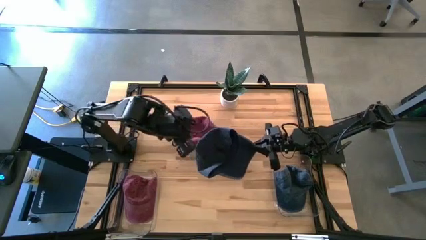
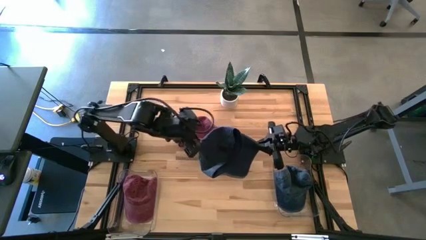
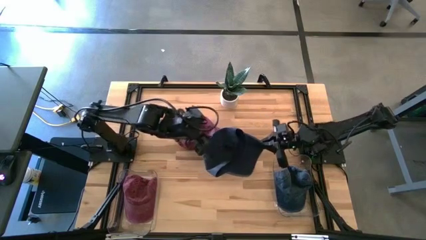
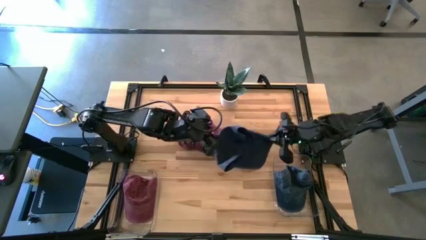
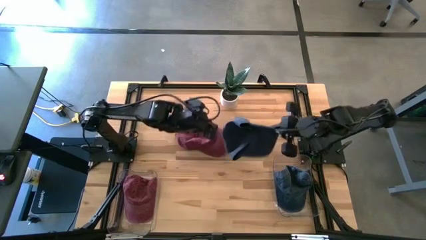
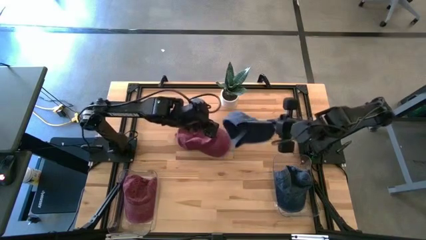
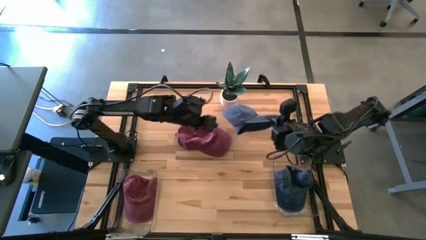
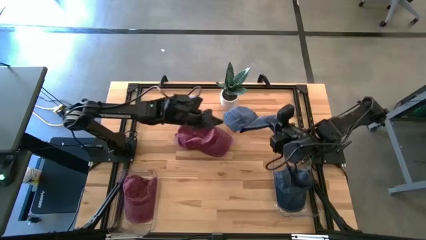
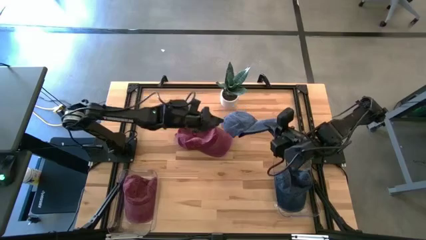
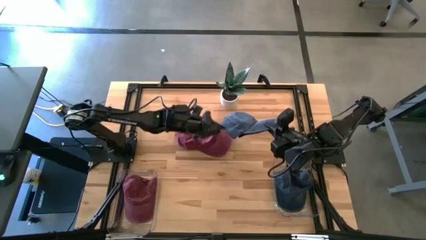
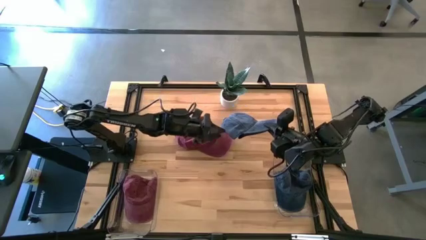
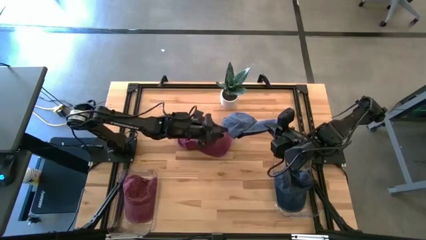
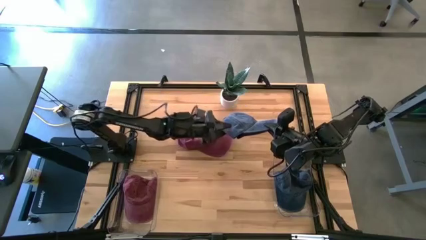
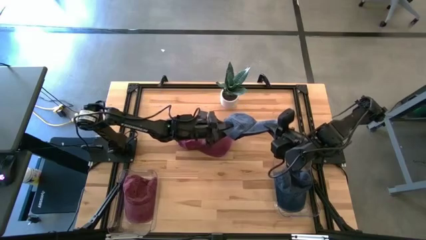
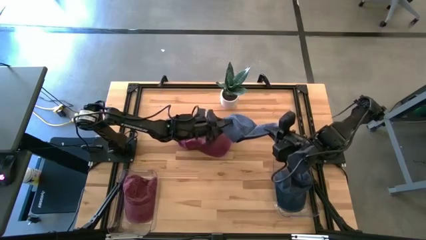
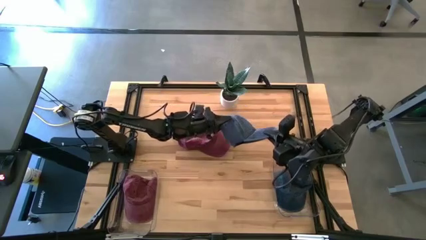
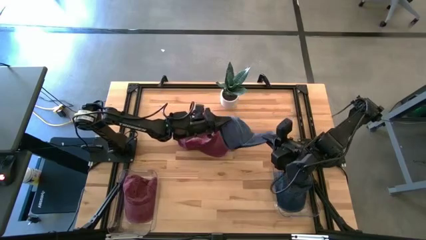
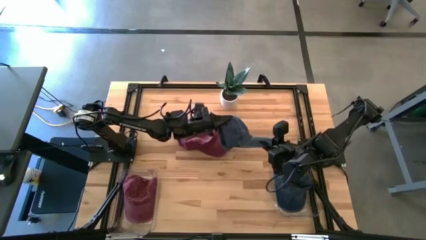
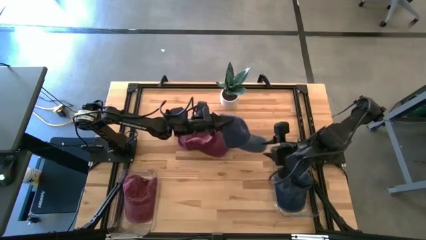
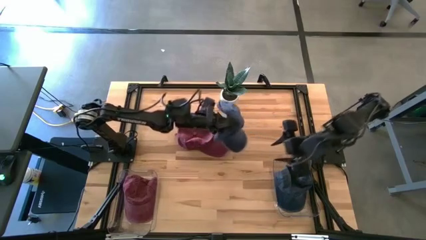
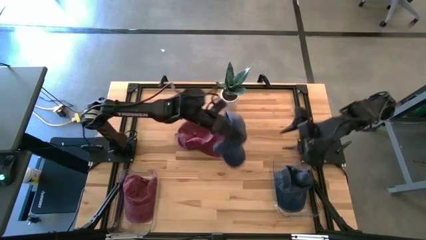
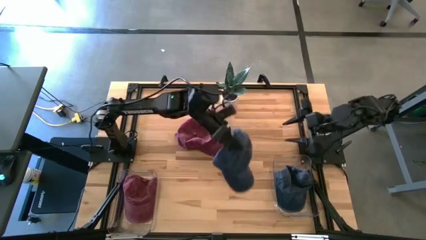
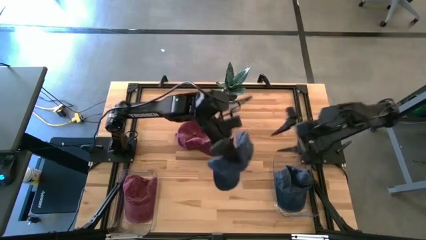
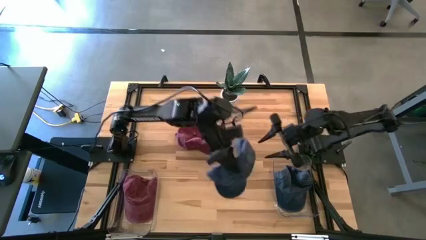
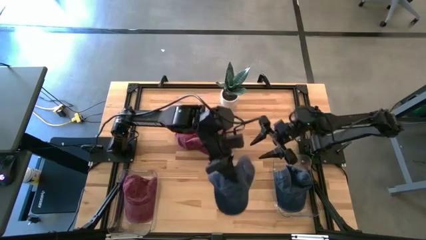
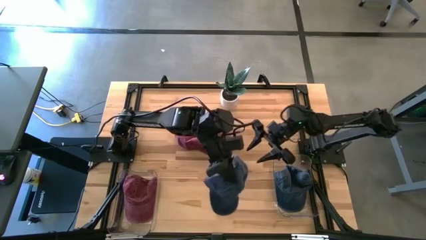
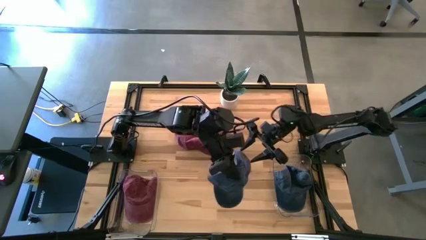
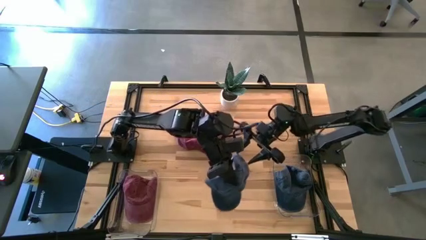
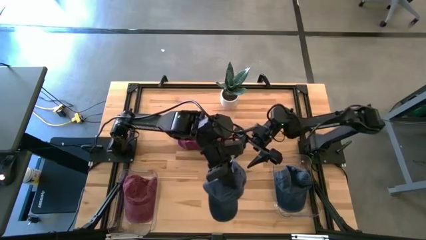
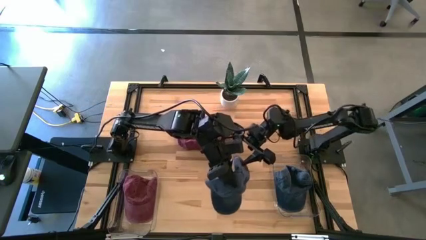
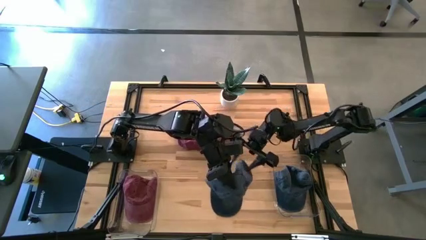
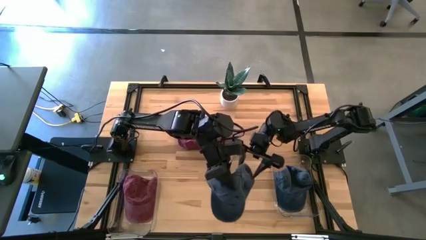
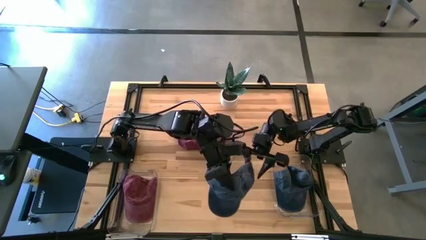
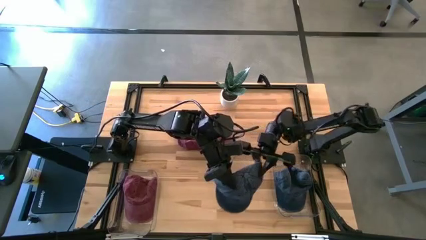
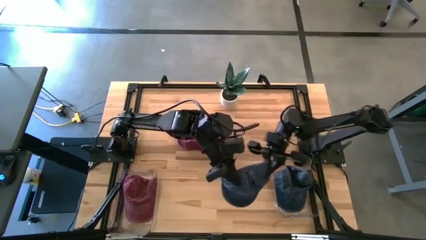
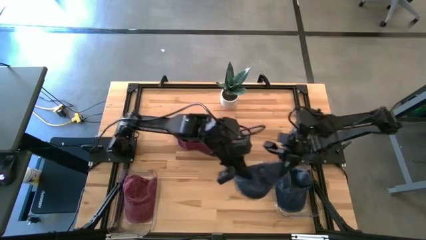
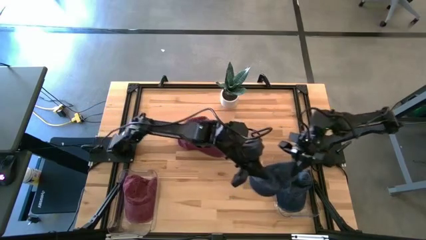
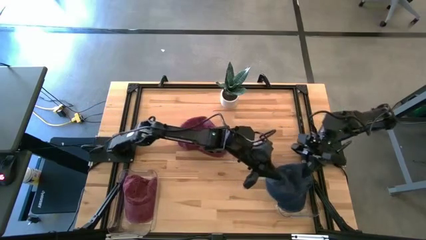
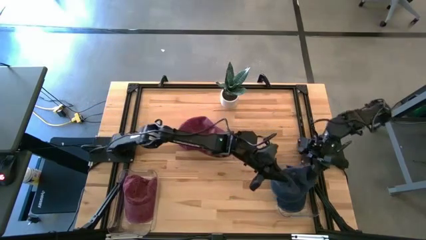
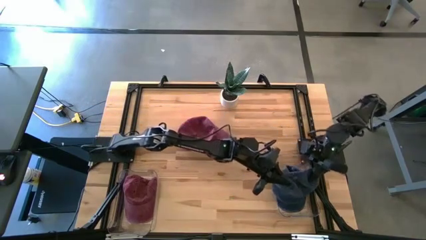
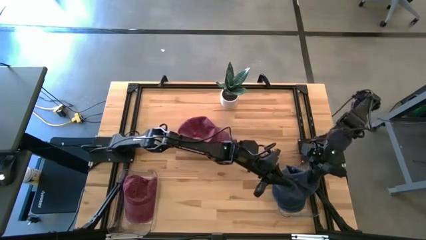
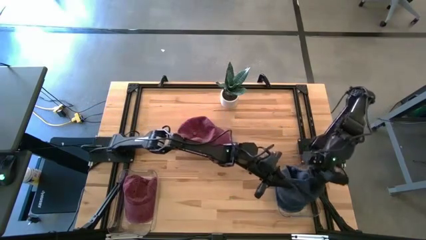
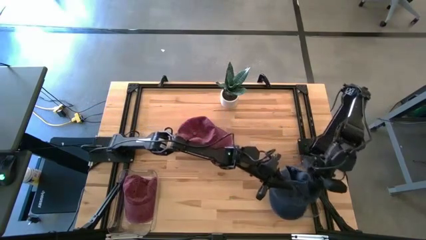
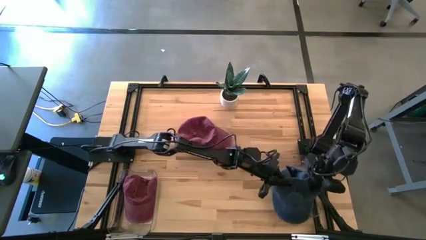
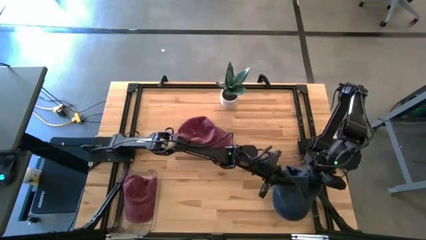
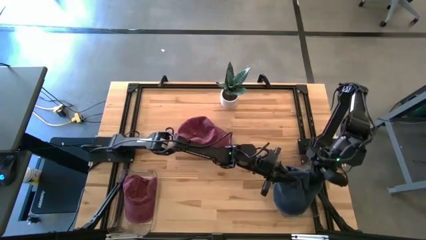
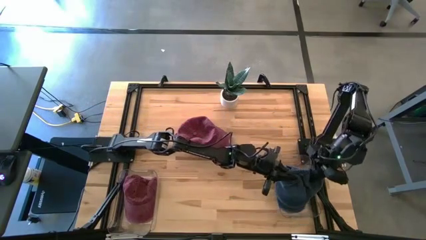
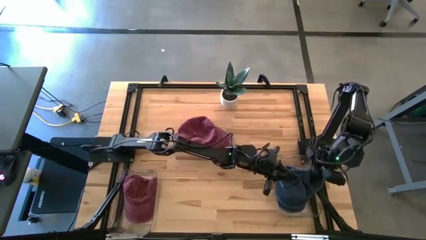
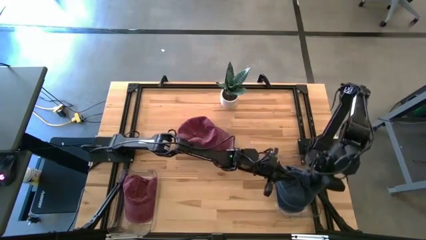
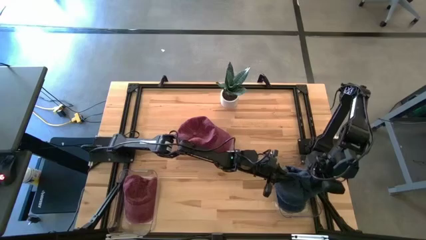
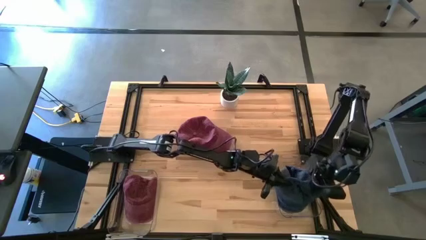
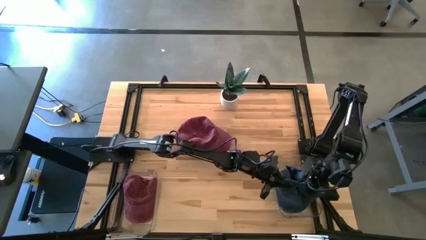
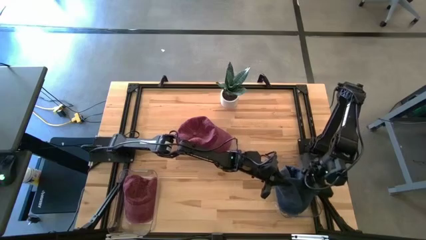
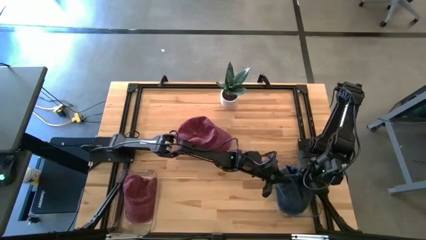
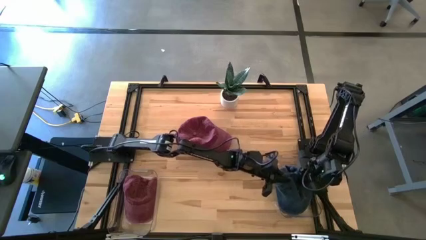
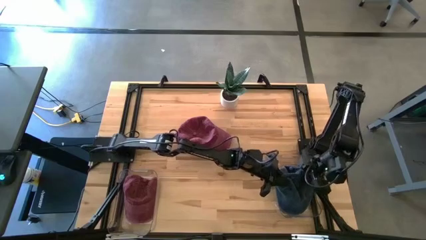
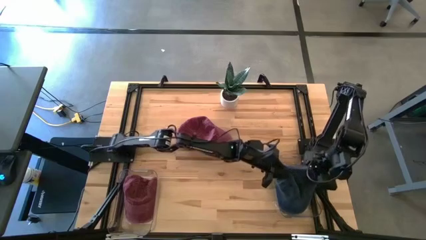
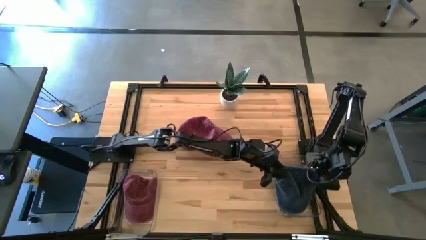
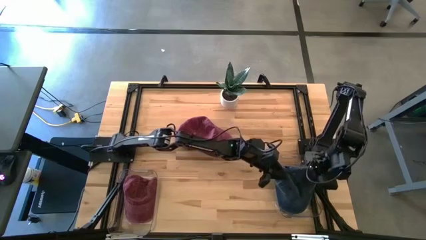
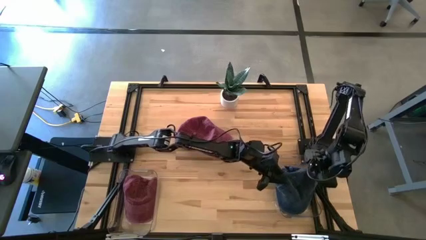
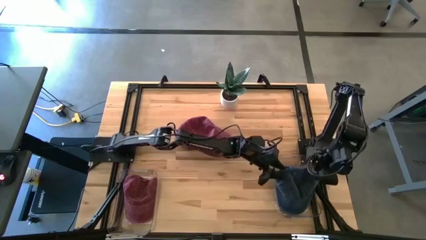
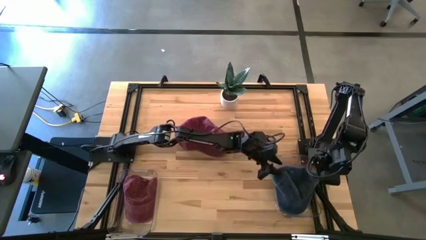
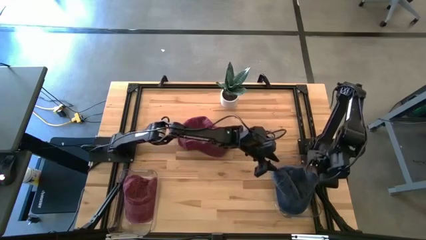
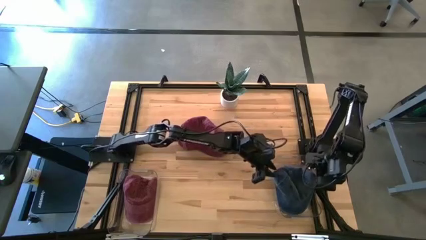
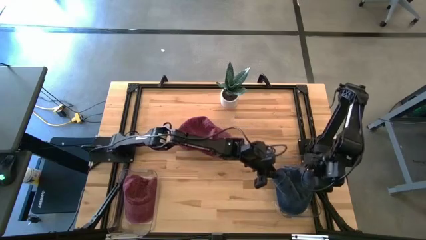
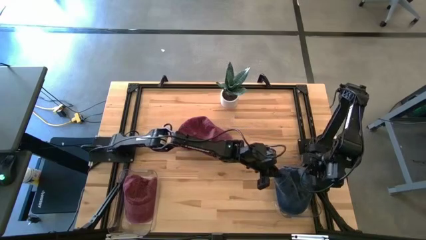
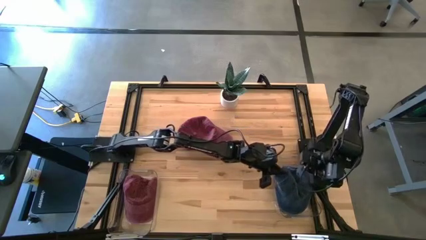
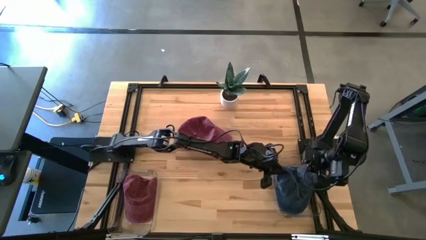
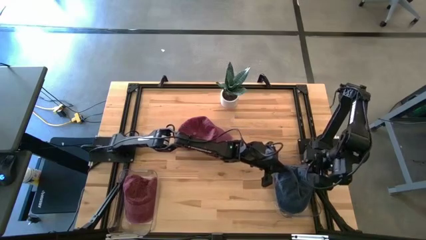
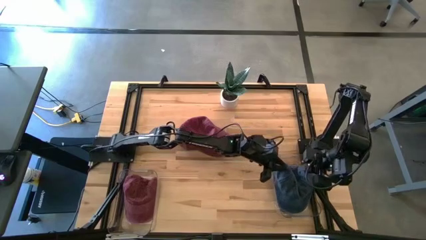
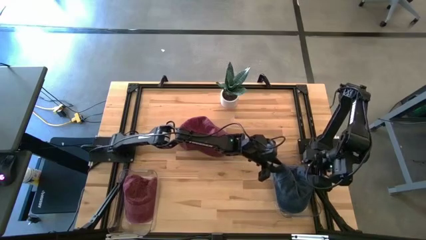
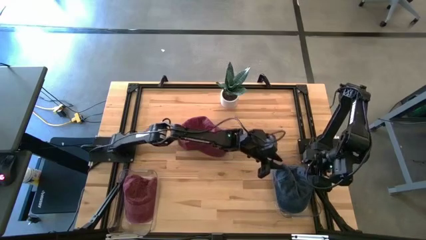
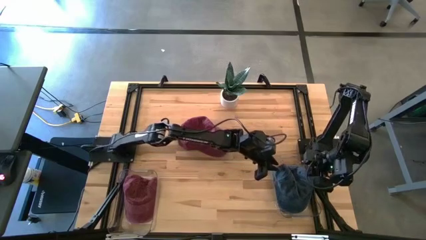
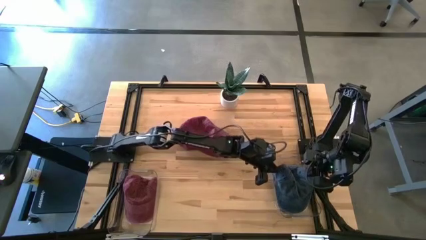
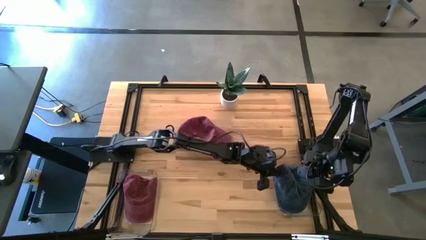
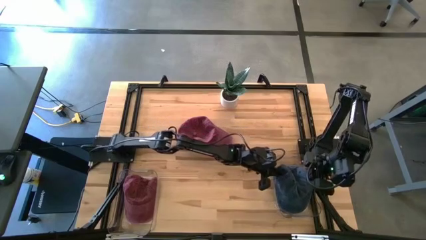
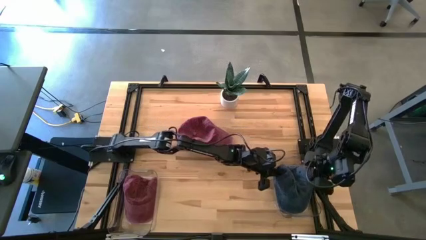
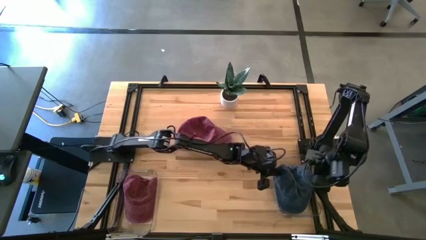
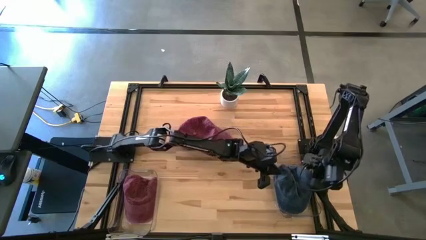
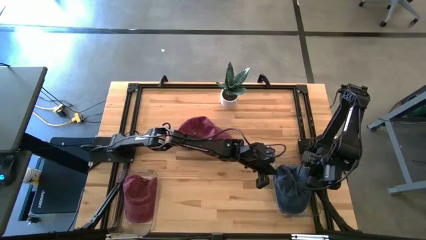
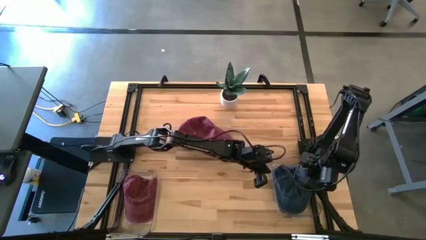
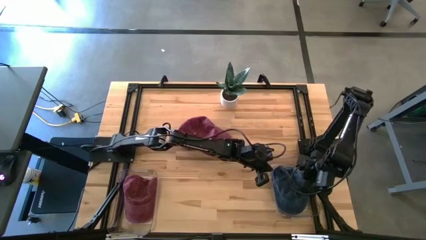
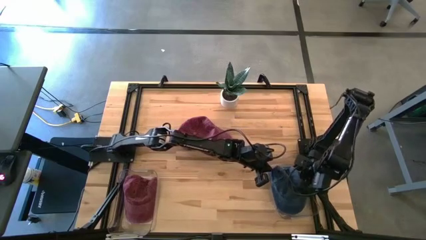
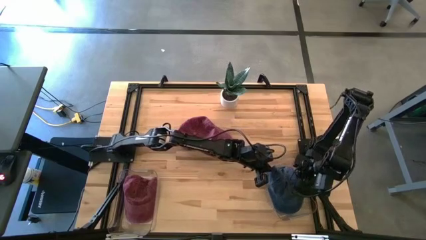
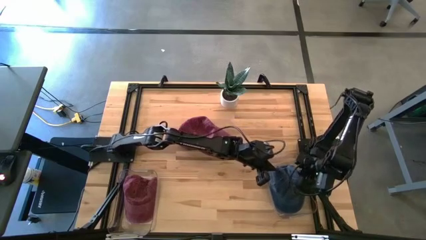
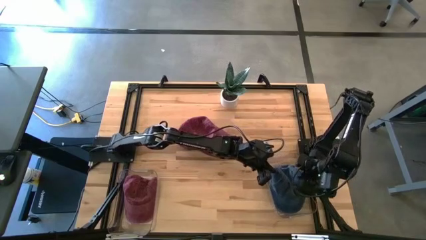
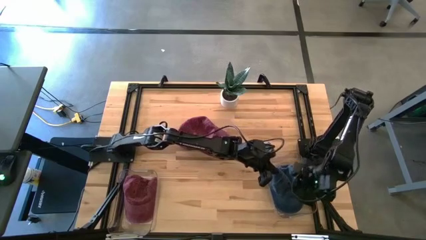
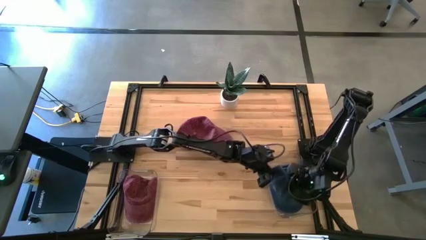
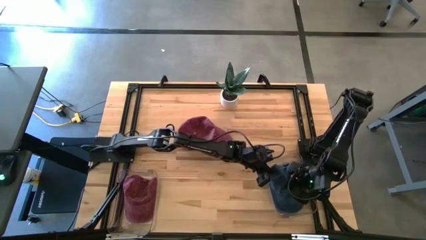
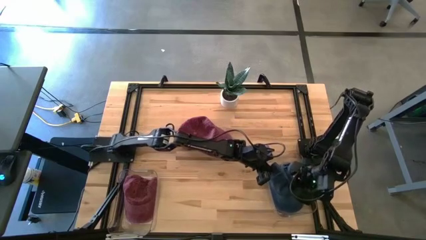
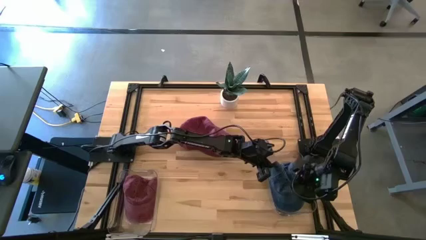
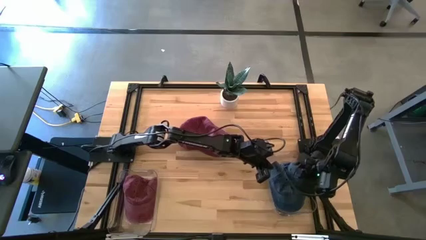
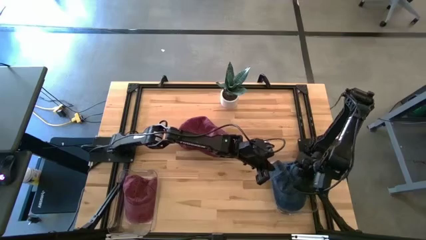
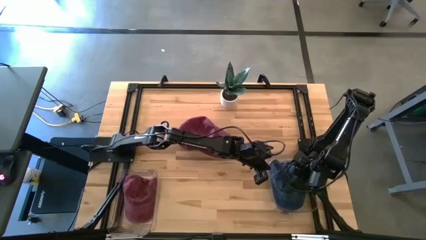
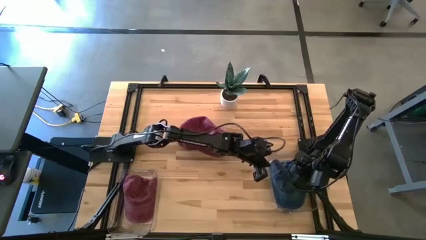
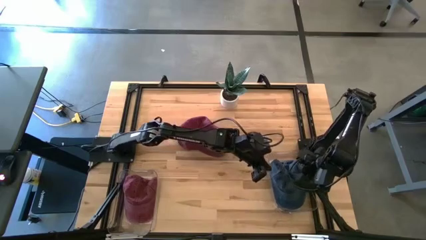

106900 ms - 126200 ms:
Task: Pick & Place hat
Put the blue cap into the right transparent bin
